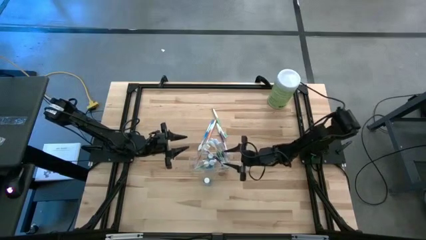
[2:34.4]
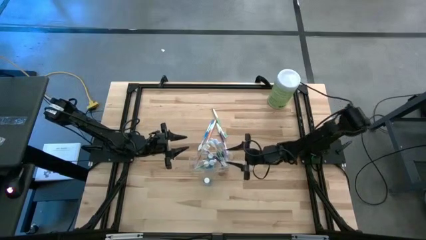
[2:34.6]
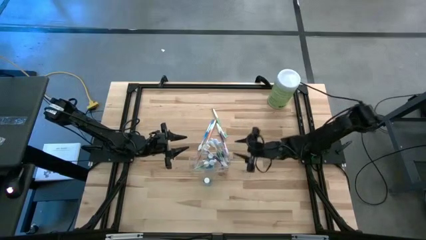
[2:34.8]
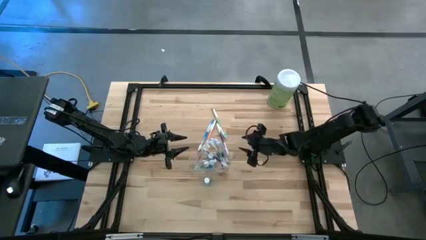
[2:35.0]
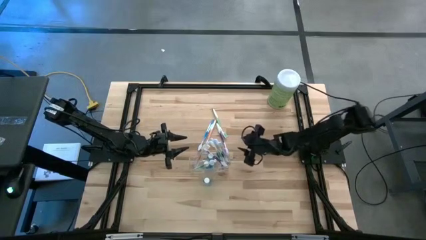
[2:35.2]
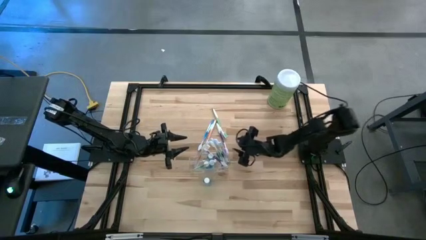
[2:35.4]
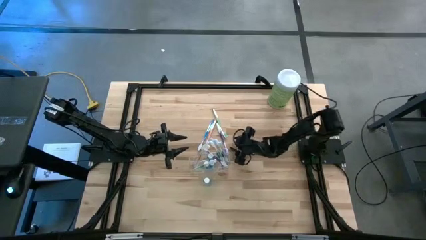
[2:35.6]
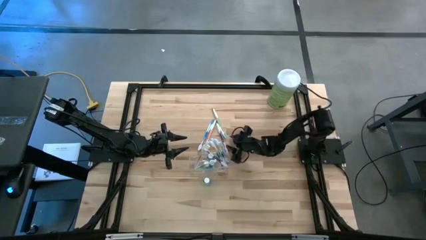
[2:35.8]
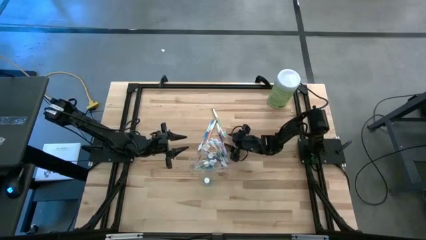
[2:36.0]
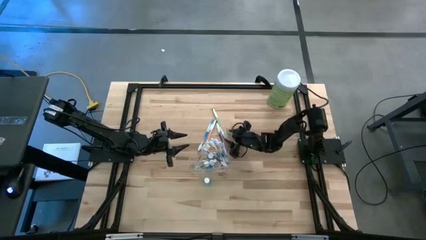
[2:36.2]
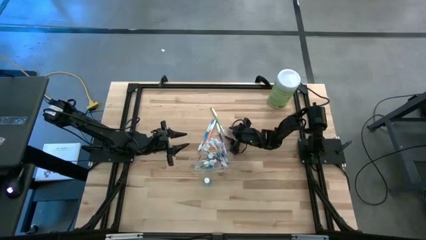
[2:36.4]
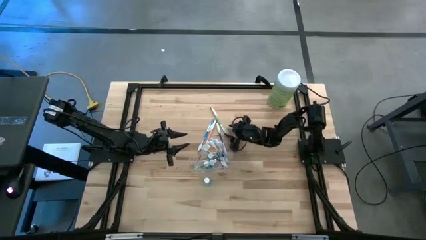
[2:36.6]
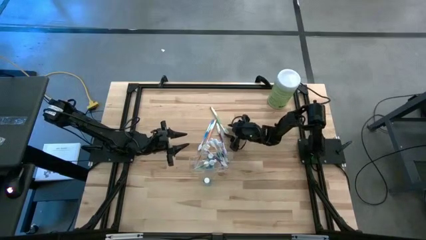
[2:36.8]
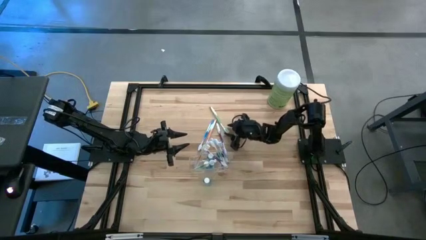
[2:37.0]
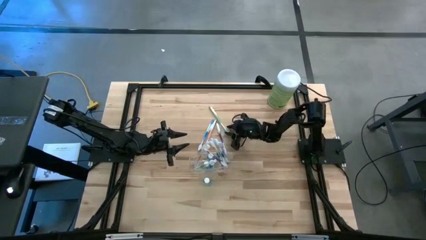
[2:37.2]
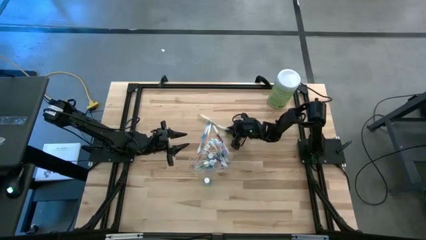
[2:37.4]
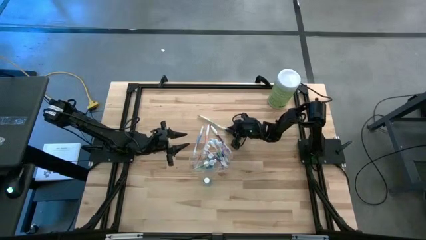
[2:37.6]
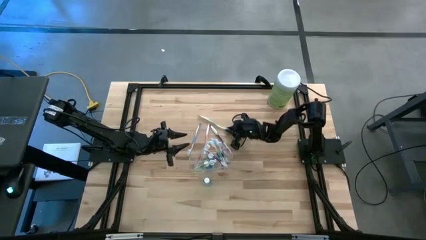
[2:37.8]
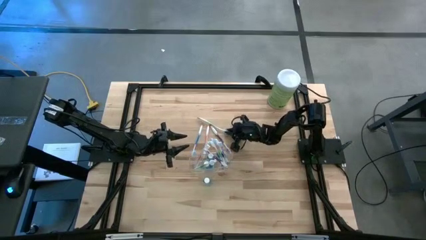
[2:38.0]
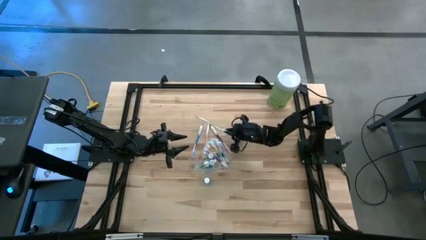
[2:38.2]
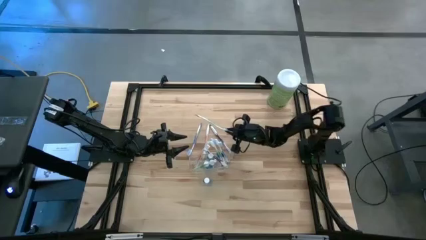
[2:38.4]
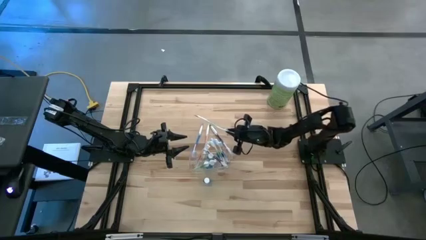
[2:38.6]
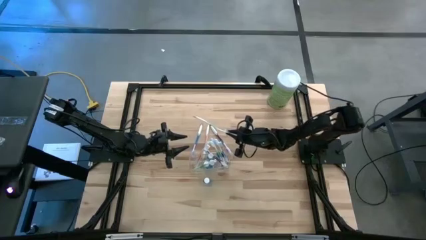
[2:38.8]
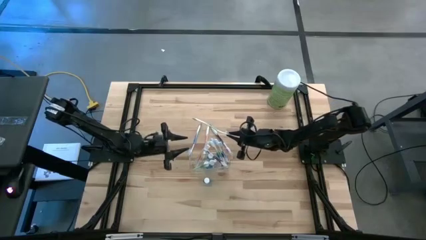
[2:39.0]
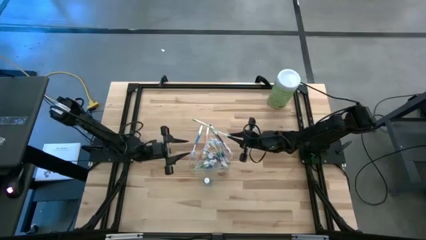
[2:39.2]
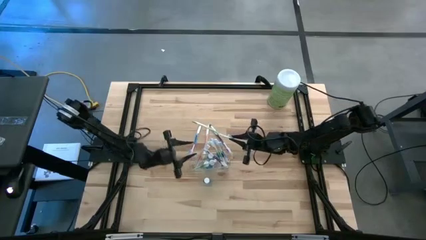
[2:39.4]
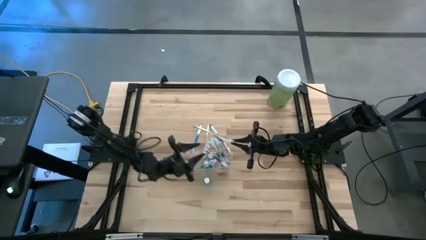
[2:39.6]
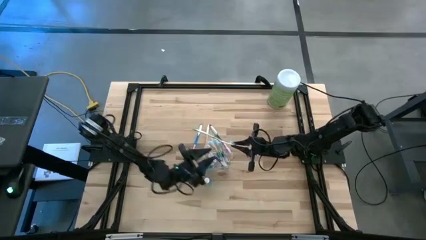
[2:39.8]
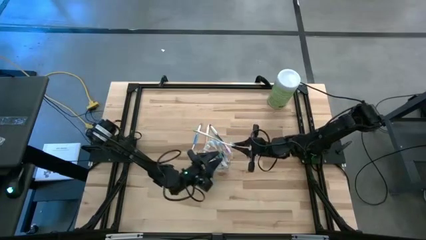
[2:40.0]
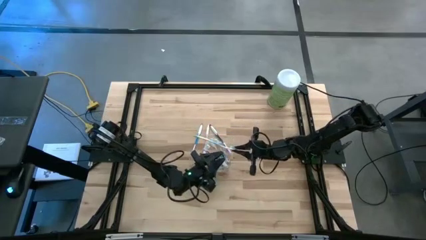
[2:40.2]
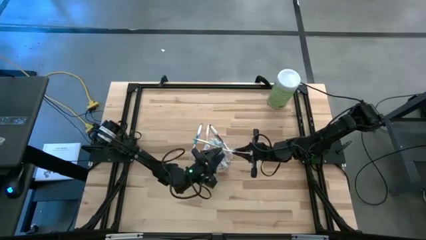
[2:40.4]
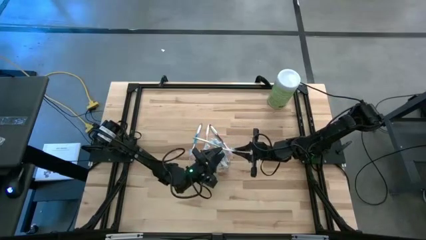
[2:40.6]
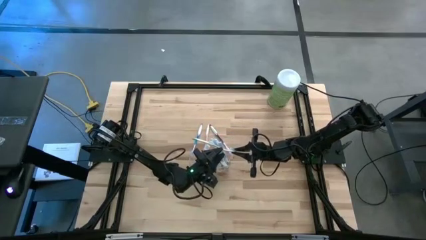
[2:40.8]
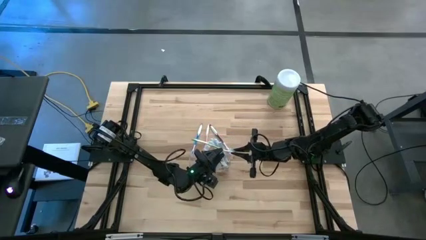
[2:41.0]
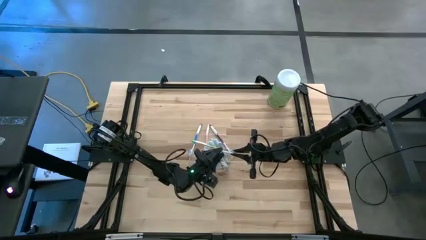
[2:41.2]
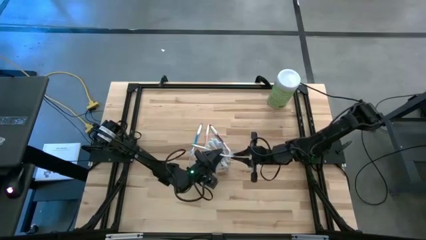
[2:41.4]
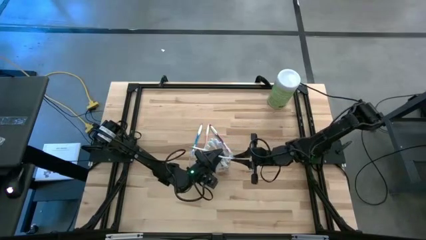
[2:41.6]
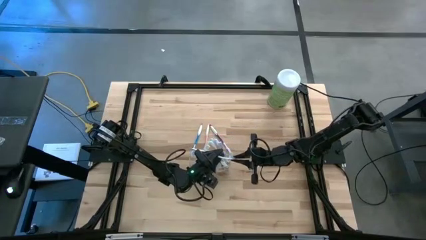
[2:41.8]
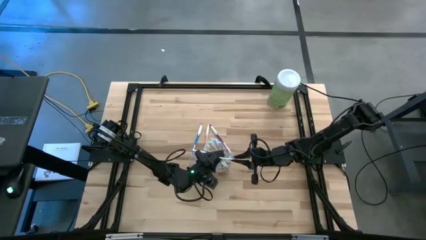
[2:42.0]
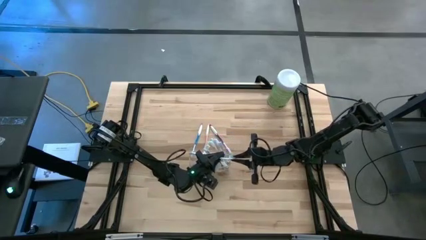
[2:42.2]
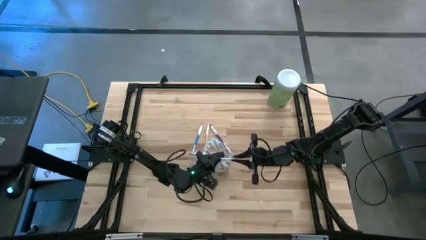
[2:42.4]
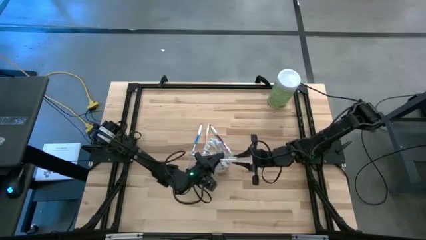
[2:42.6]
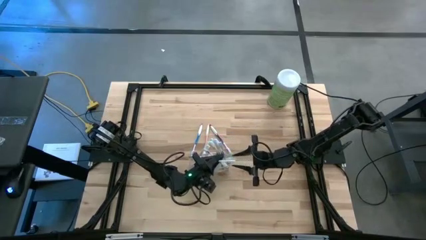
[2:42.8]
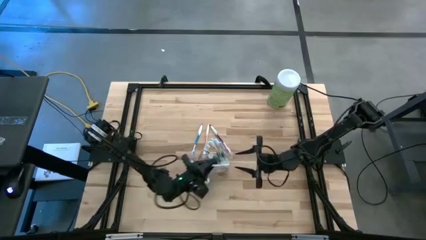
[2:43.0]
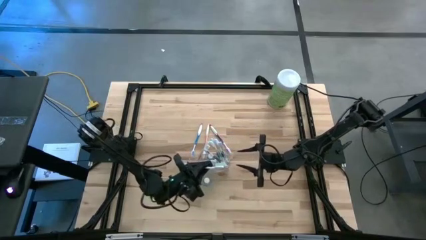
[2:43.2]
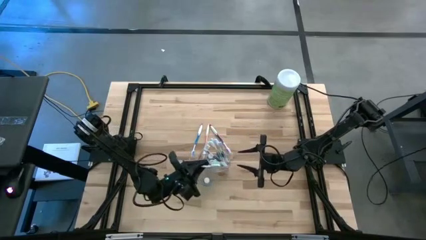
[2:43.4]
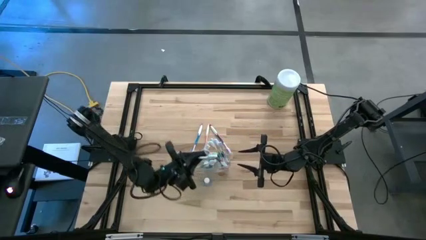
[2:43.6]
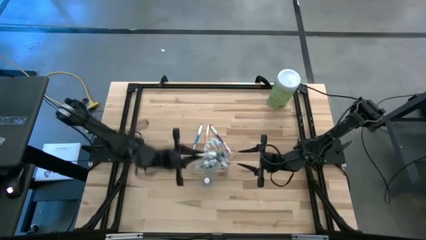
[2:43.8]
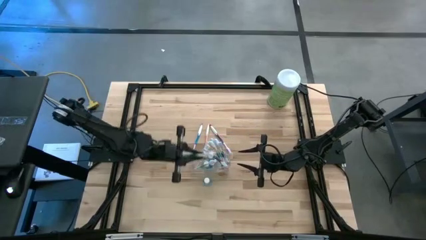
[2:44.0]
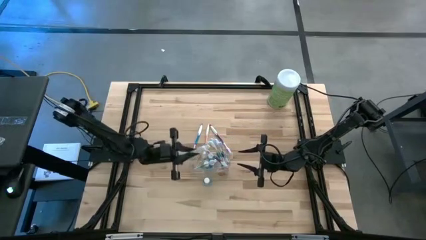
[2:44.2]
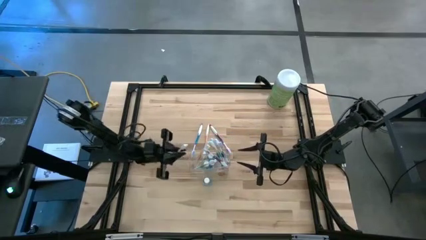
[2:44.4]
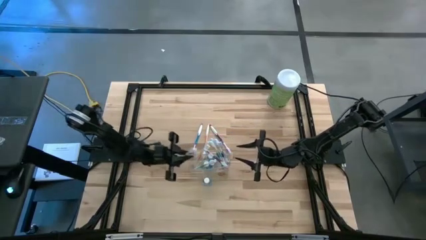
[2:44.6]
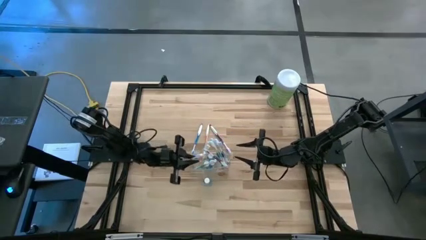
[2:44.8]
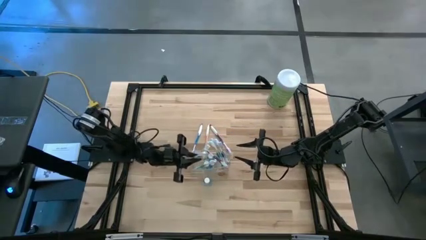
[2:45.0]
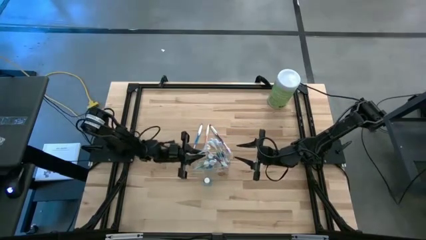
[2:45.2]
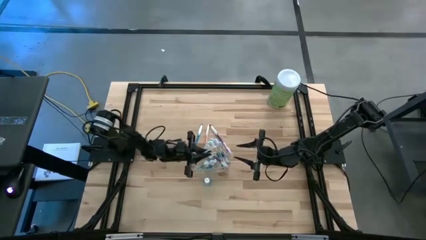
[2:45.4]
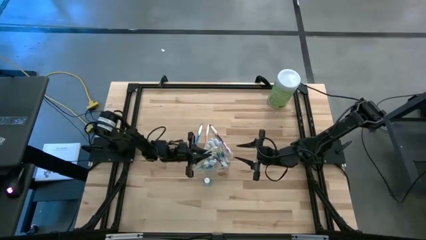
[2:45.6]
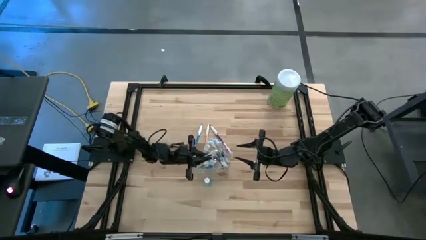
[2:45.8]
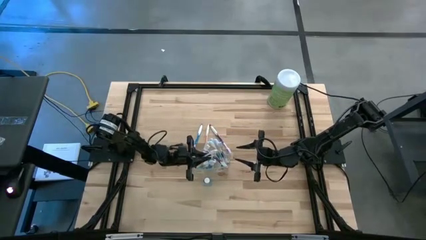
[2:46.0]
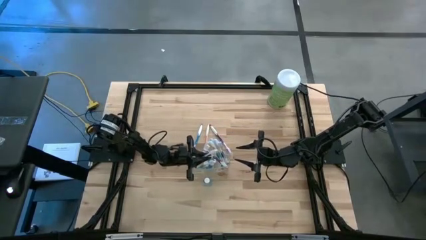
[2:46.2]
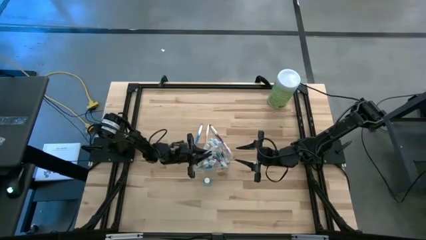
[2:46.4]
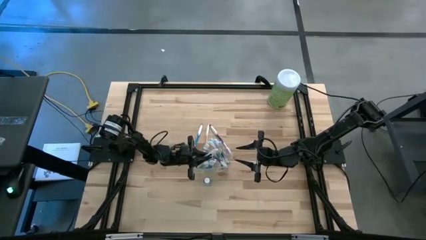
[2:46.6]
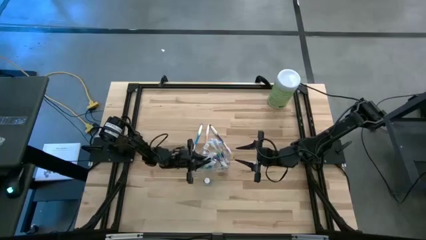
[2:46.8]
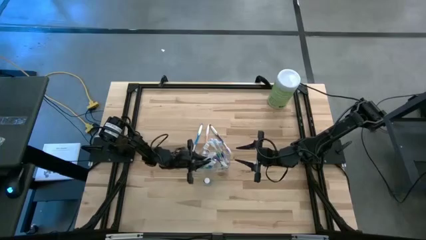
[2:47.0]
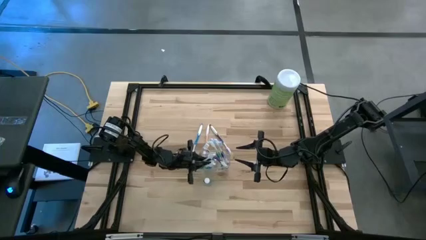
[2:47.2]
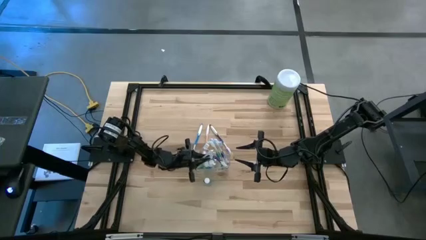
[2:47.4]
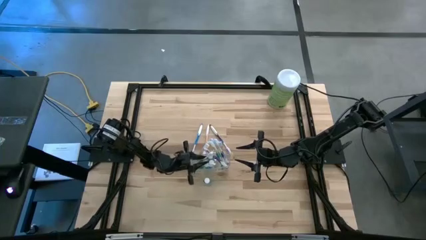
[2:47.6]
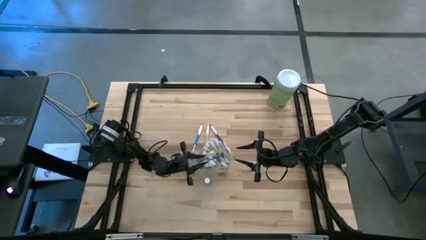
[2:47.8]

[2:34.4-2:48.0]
Task: Pick & Place toothbrushing station
Put the green toothbrush into the transparent organizer
